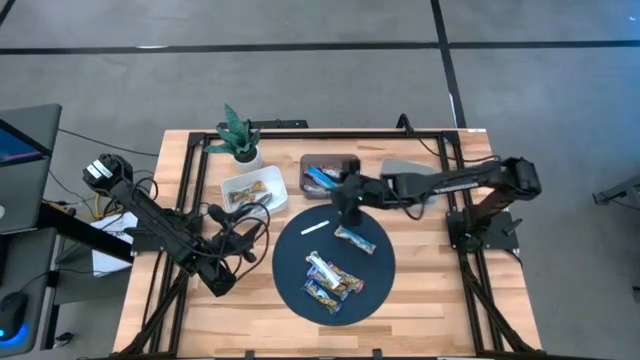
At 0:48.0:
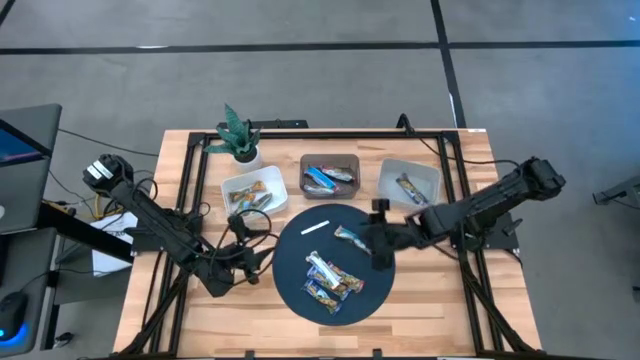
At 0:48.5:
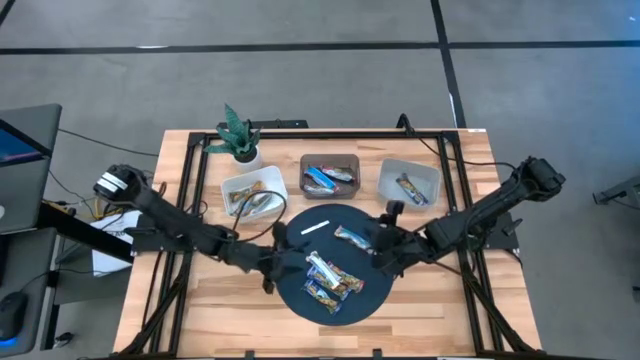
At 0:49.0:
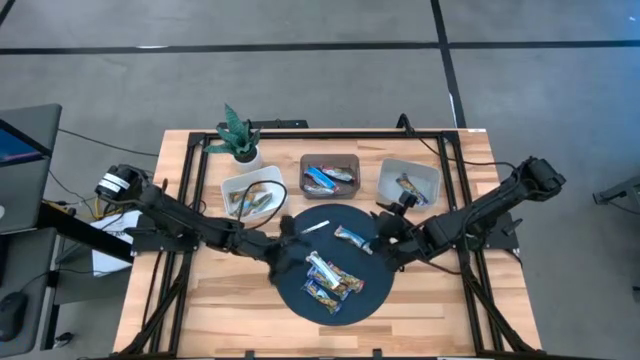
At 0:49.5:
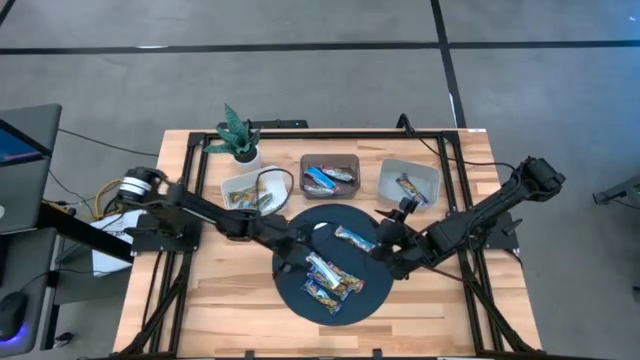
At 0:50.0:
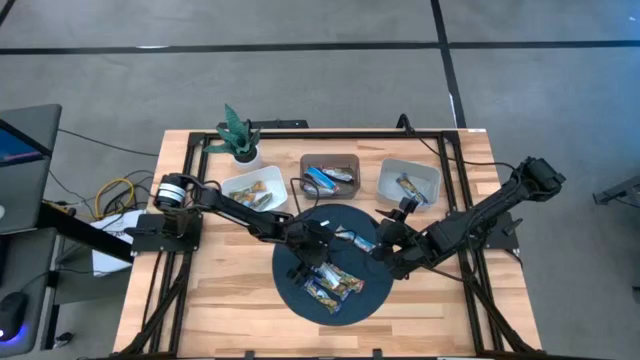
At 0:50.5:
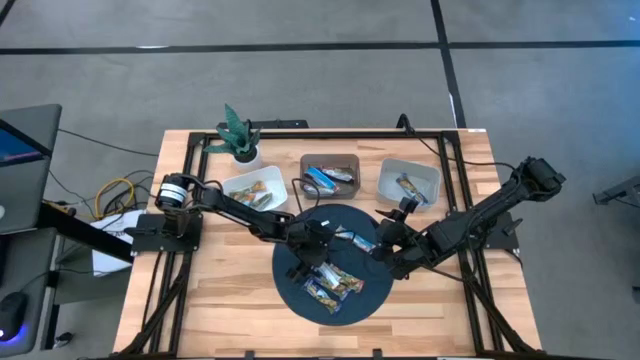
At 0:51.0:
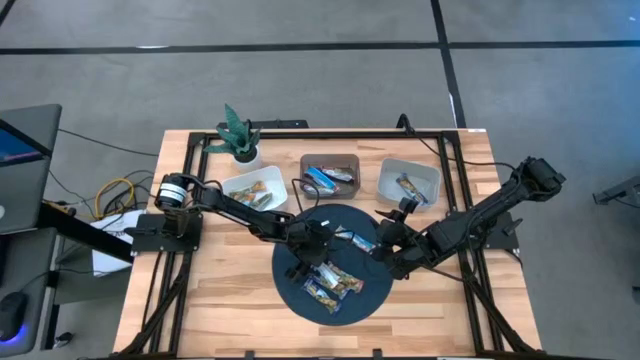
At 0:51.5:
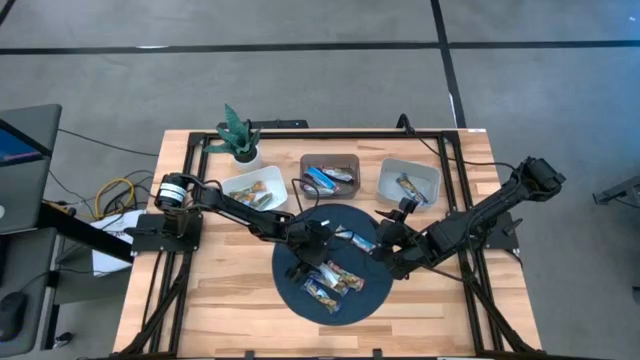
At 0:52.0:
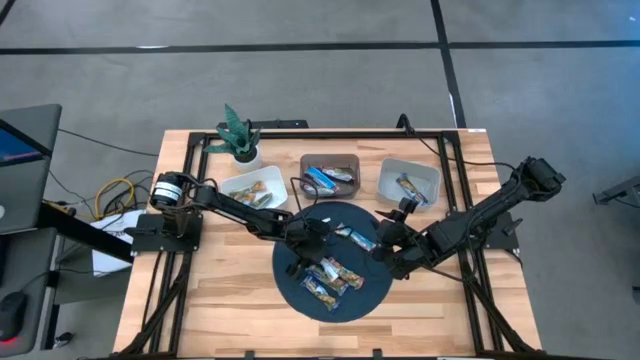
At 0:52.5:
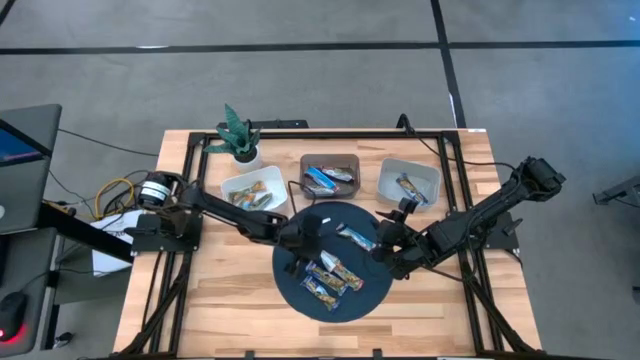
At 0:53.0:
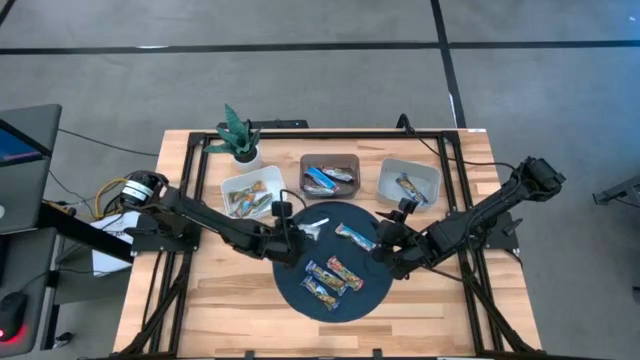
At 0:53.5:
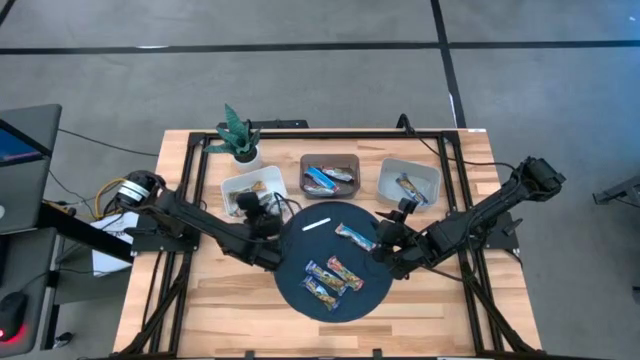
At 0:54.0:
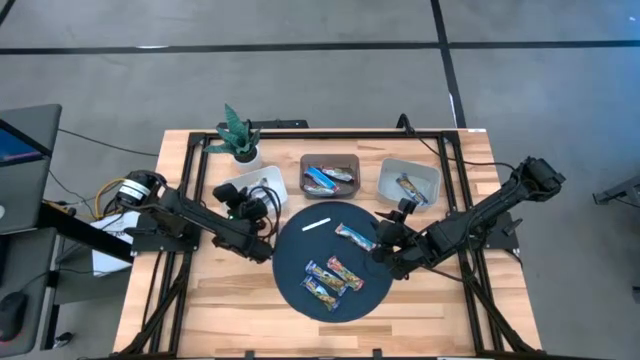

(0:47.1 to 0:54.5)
Task: Pick and place Granola Bars by type
Put the bottom orange granola bar into the white bin

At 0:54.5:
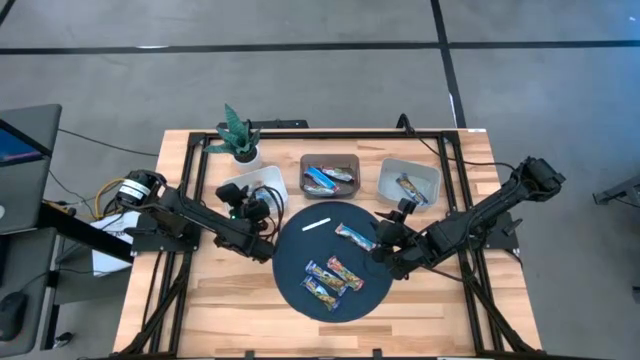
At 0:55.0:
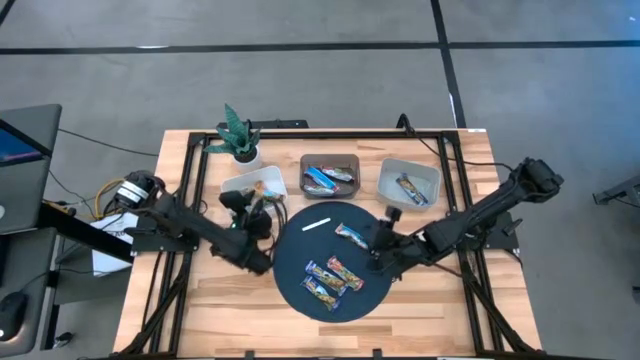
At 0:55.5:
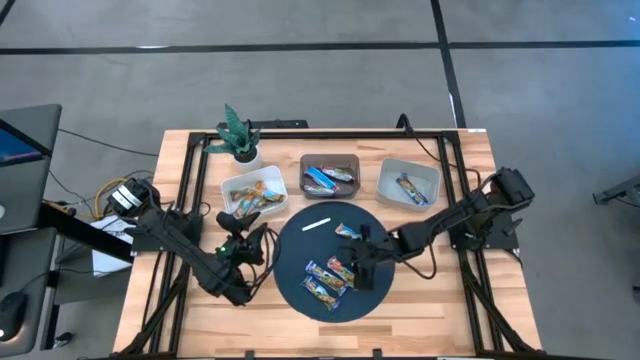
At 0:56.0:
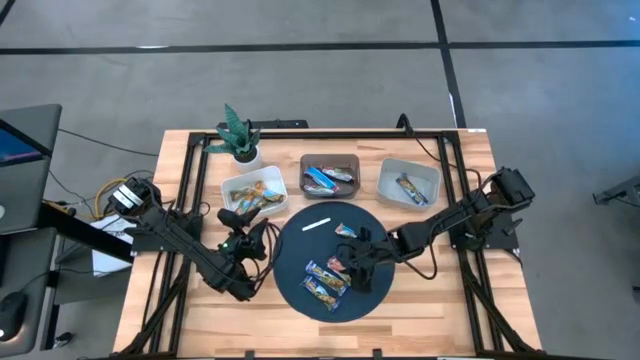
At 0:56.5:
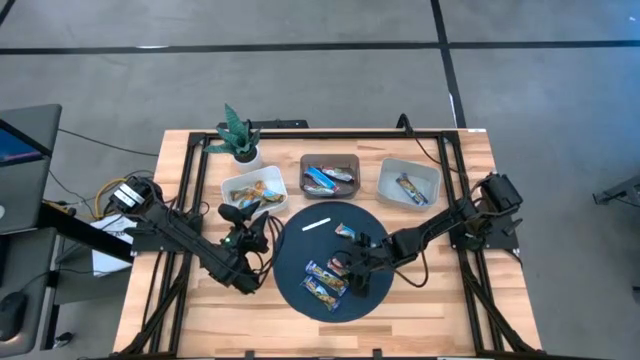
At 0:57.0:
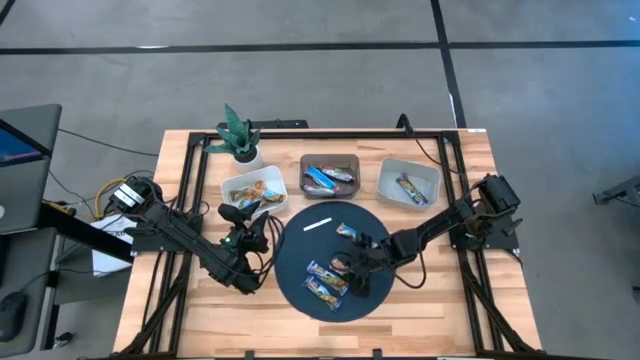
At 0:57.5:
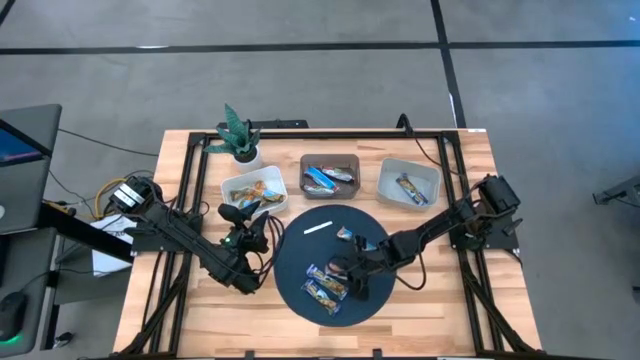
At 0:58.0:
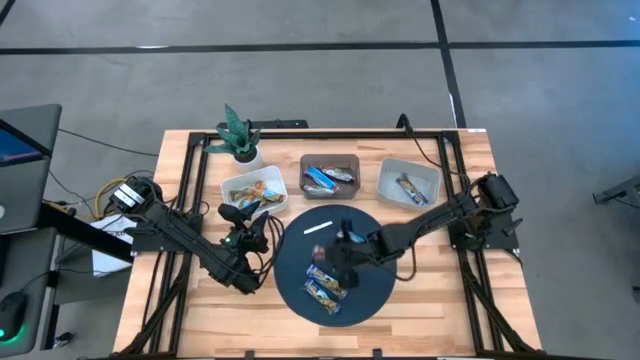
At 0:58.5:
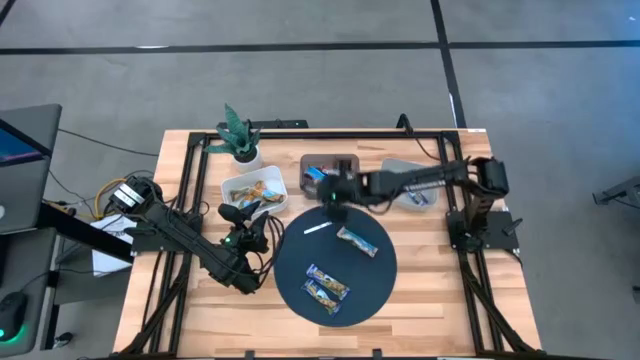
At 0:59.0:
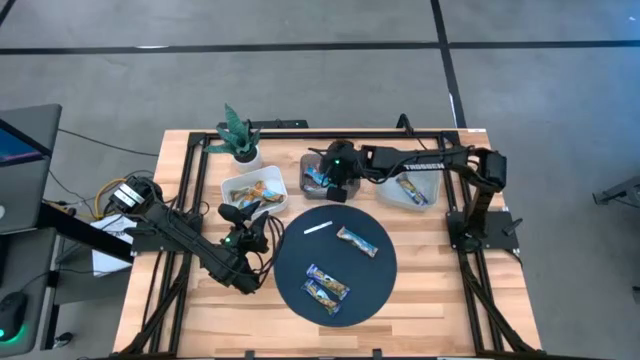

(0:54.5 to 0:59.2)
Put the red granola bar into the black bin

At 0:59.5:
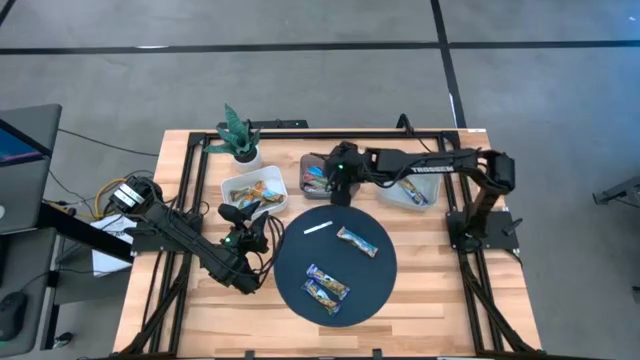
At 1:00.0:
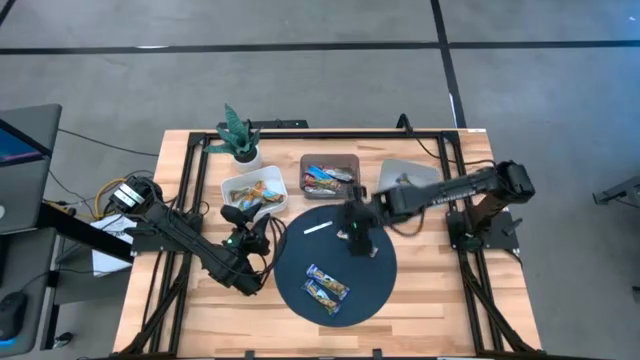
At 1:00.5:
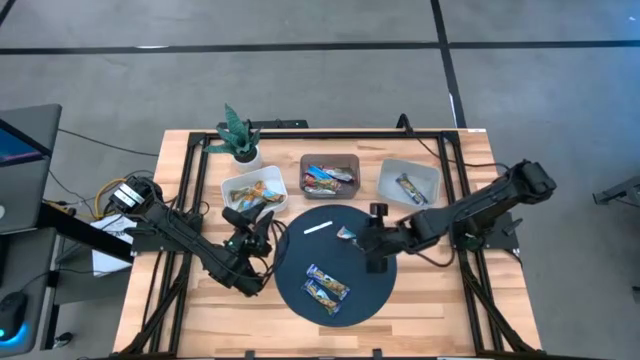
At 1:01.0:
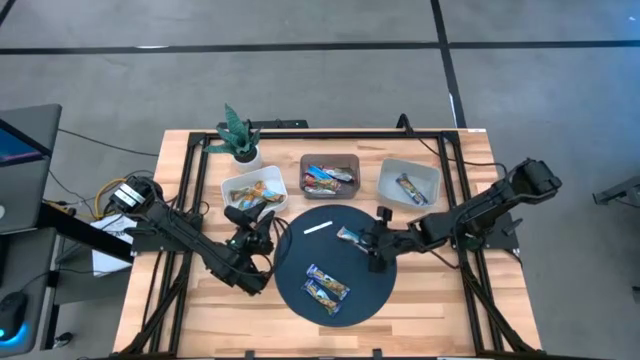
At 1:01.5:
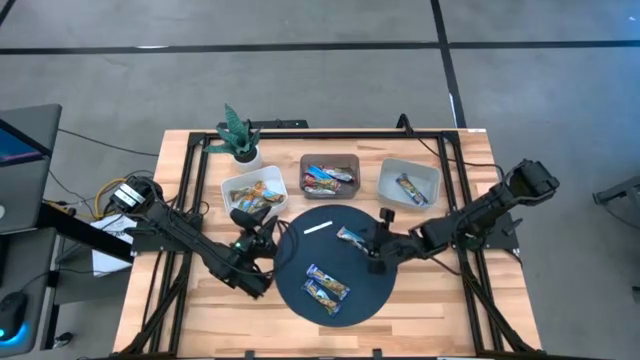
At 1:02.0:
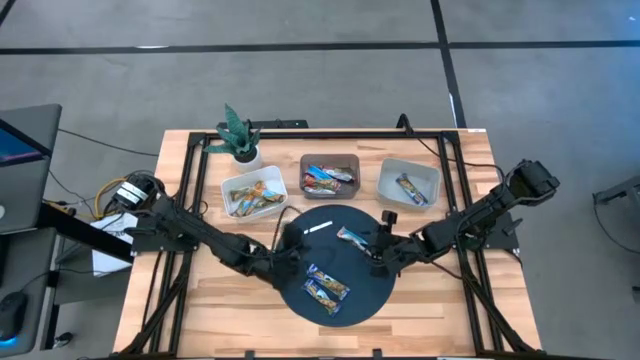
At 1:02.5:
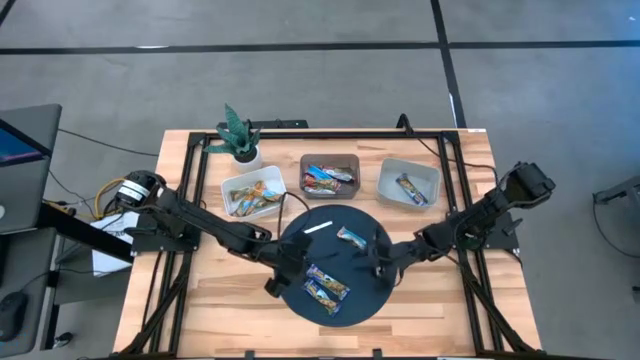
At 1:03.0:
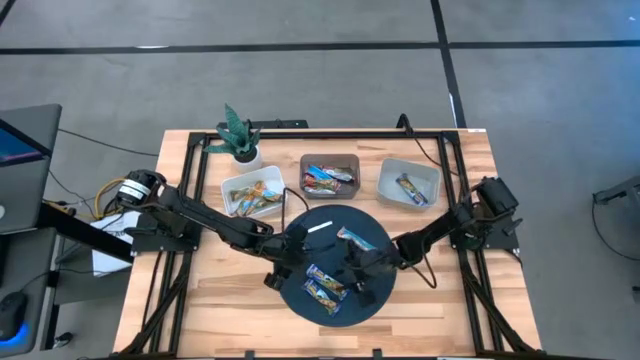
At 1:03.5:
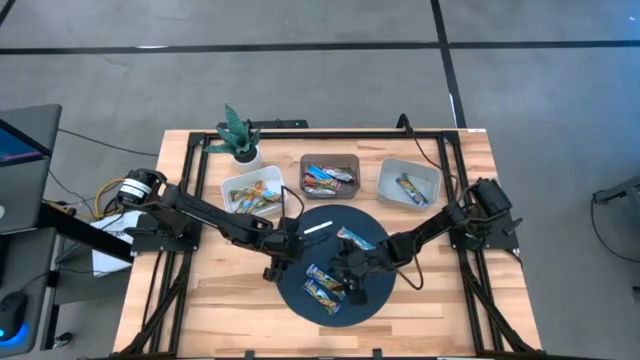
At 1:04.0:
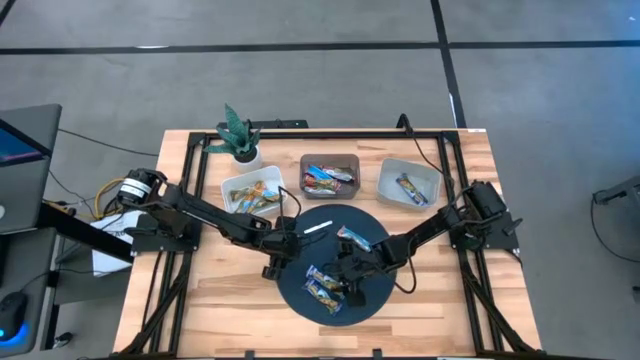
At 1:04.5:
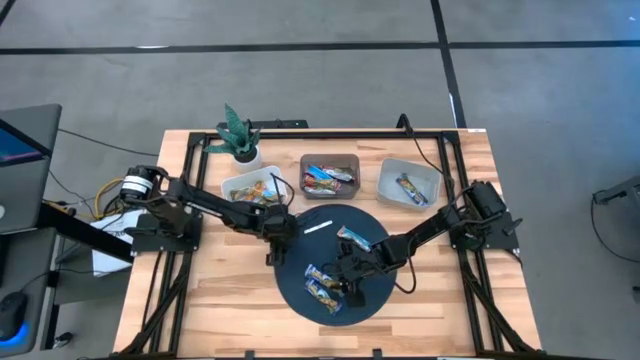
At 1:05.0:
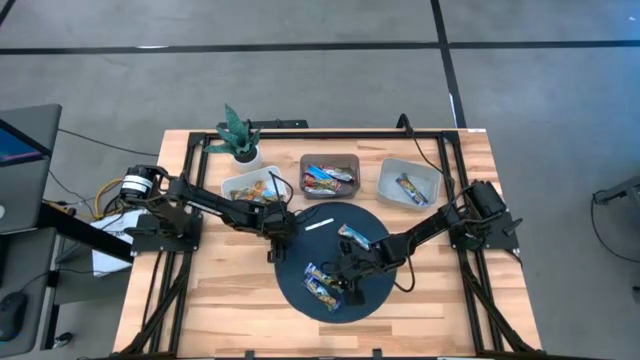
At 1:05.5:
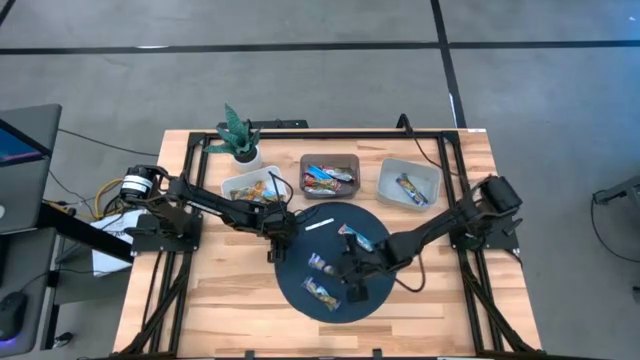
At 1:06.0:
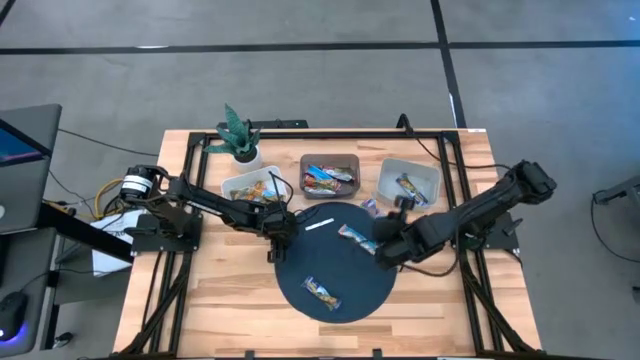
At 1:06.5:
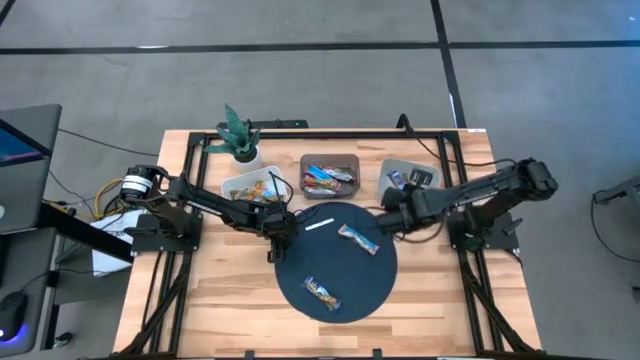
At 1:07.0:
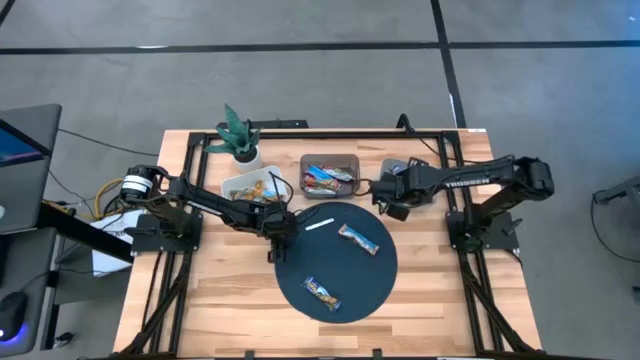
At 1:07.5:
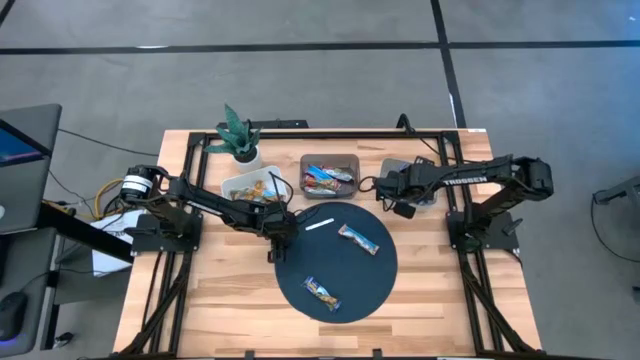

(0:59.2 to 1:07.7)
Put the top purple granola bar into the gray bin

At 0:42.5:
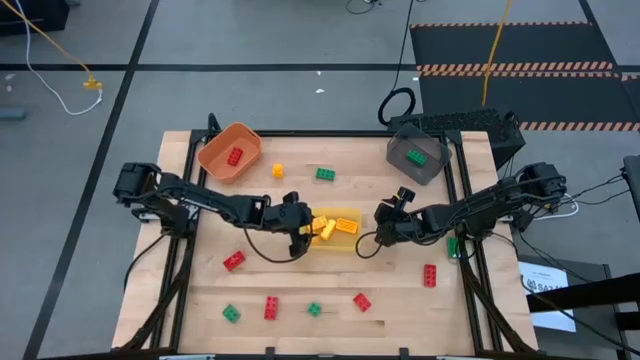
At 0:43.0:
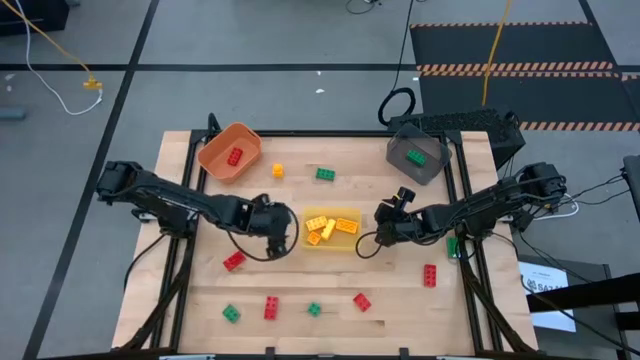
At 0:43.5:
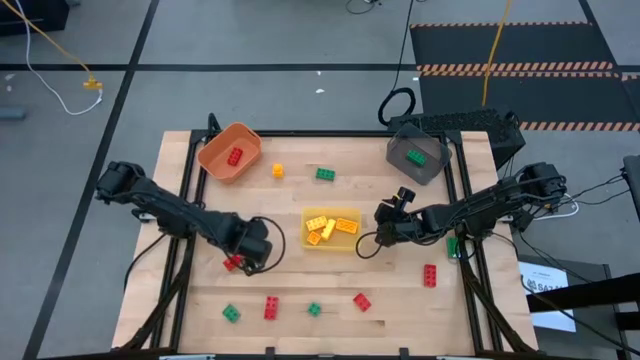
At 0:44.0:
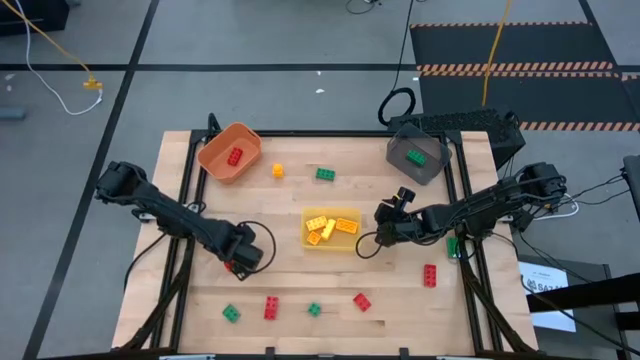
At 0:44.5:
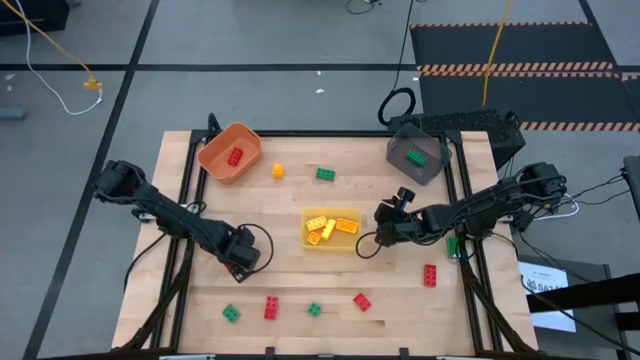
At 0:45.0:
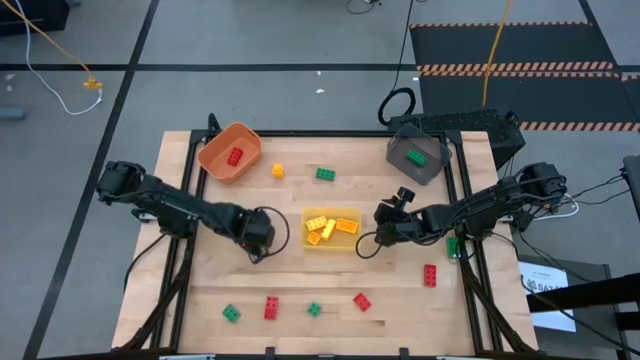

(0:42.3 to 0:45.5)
Task: Sort & place blocks by color
Put the top left red 8-stud game piece into the orange bin
